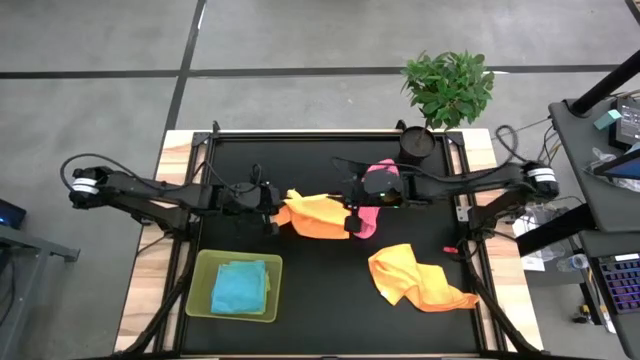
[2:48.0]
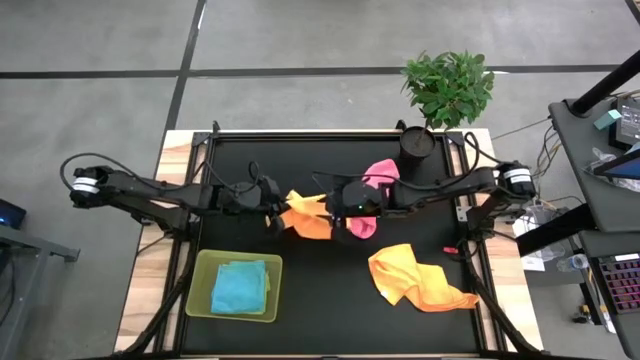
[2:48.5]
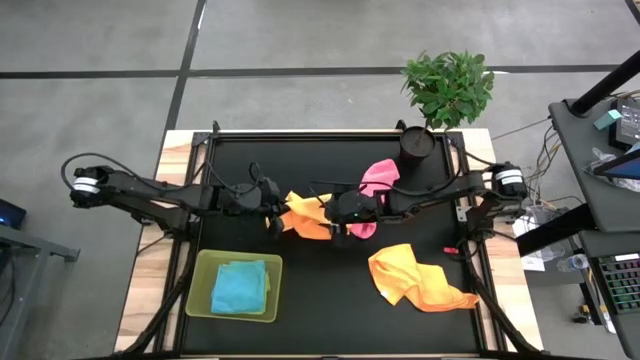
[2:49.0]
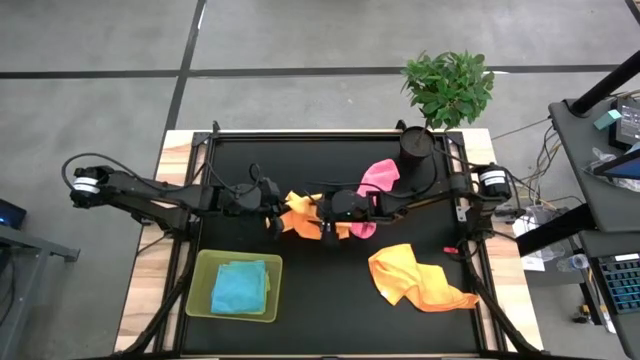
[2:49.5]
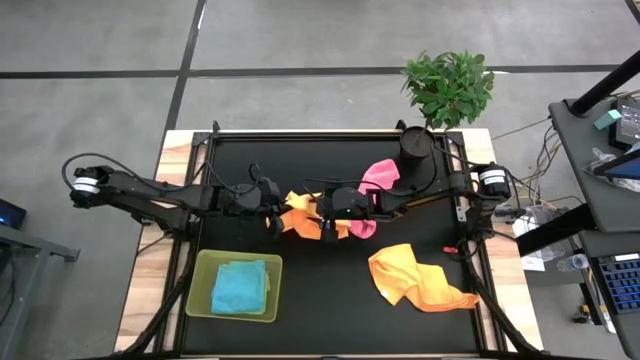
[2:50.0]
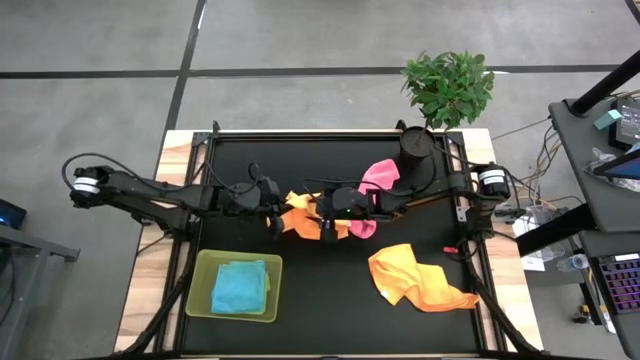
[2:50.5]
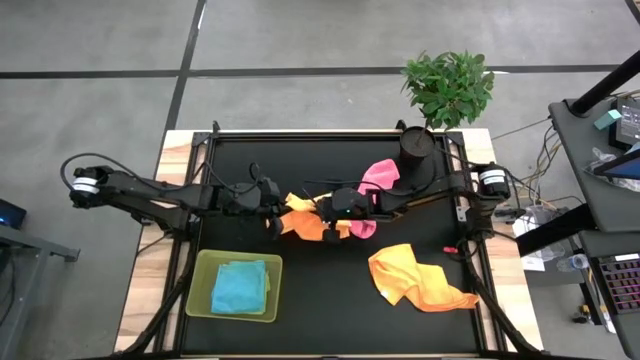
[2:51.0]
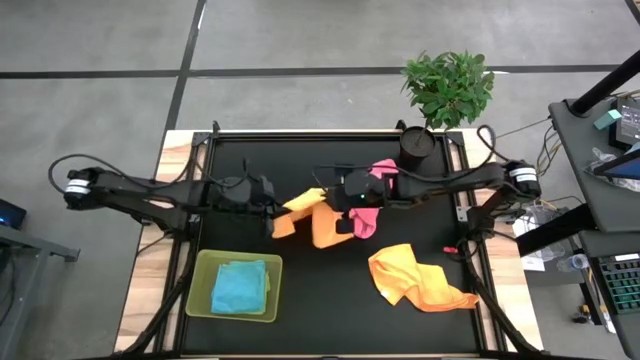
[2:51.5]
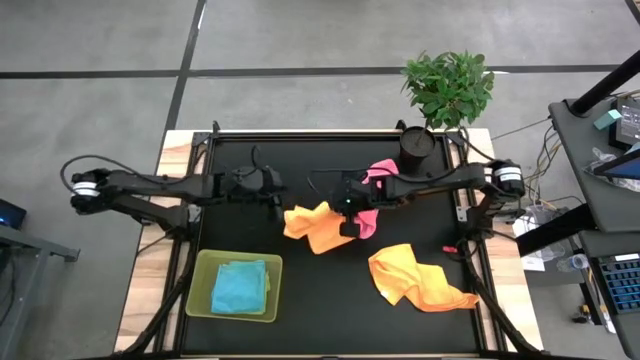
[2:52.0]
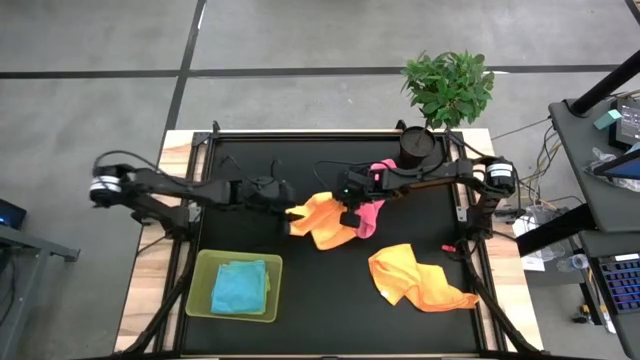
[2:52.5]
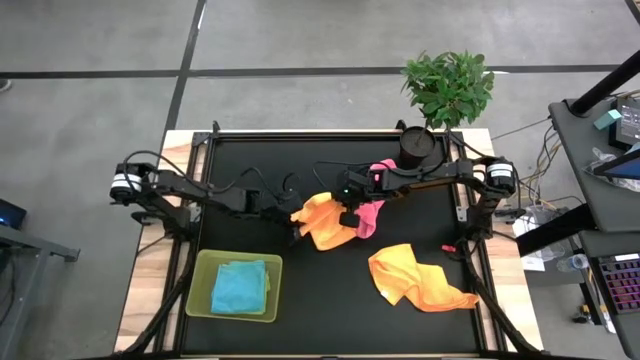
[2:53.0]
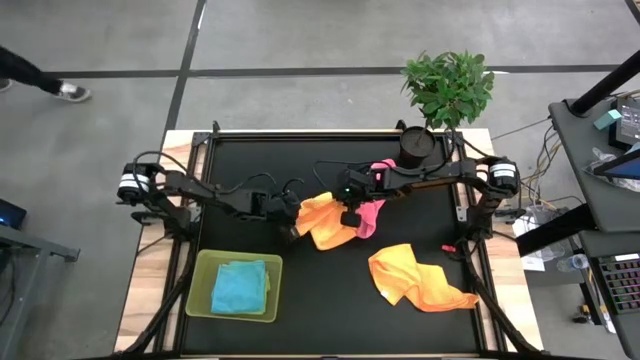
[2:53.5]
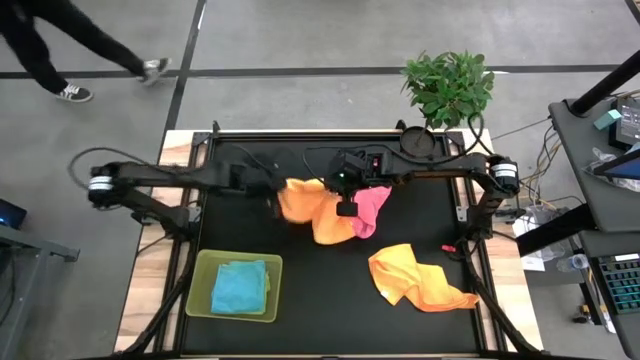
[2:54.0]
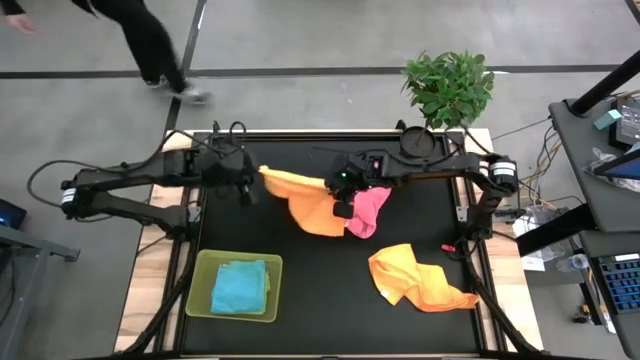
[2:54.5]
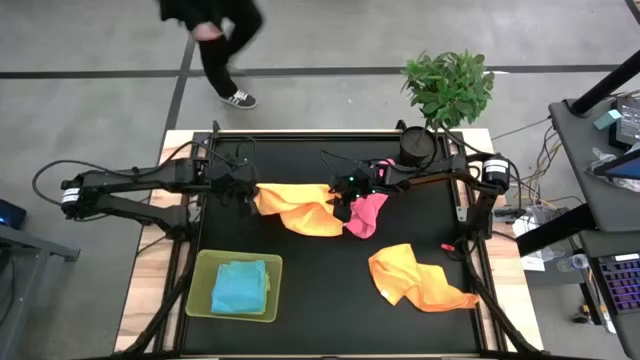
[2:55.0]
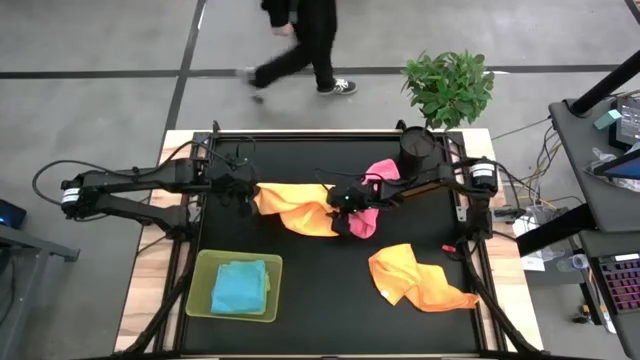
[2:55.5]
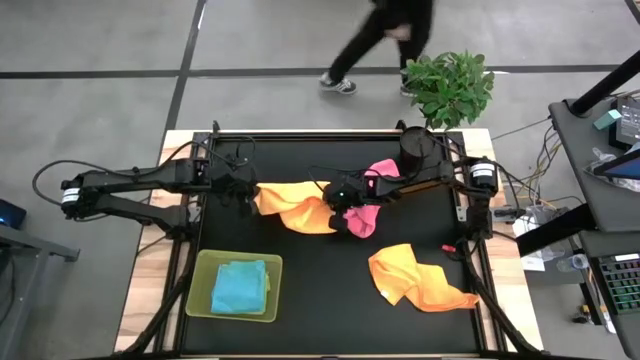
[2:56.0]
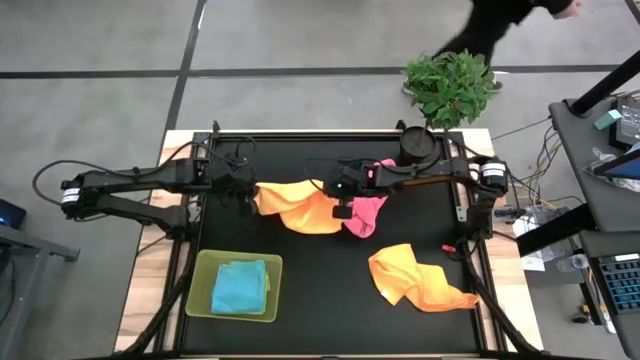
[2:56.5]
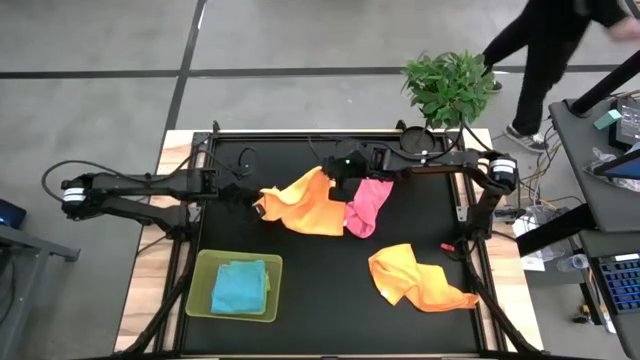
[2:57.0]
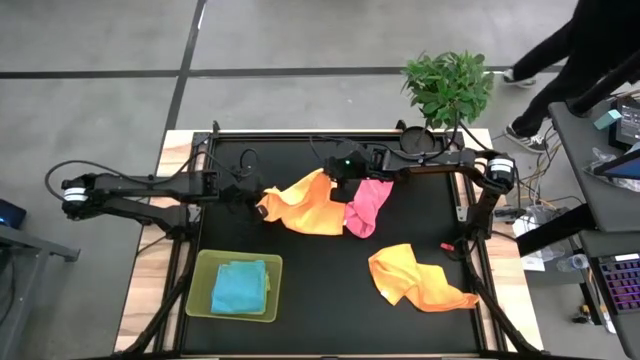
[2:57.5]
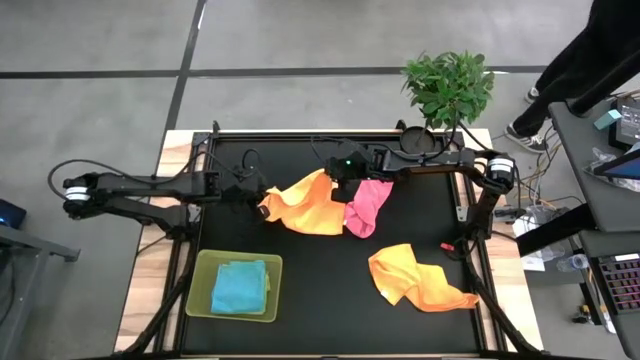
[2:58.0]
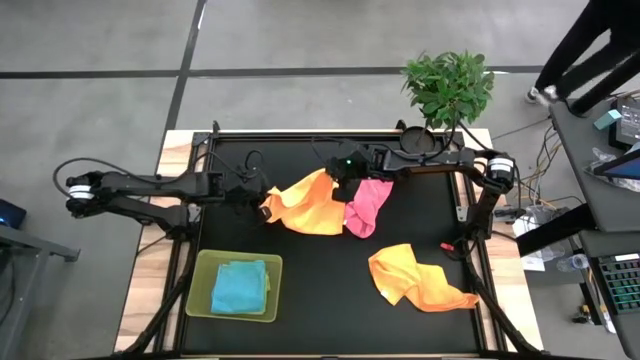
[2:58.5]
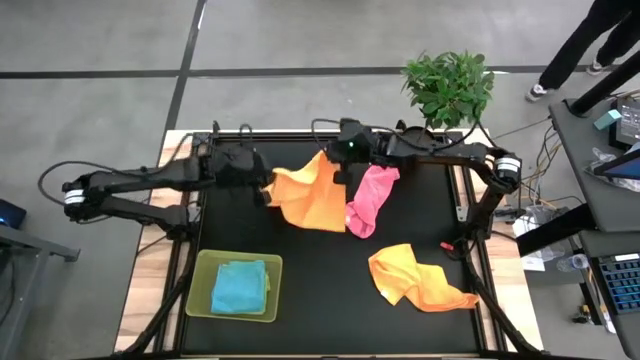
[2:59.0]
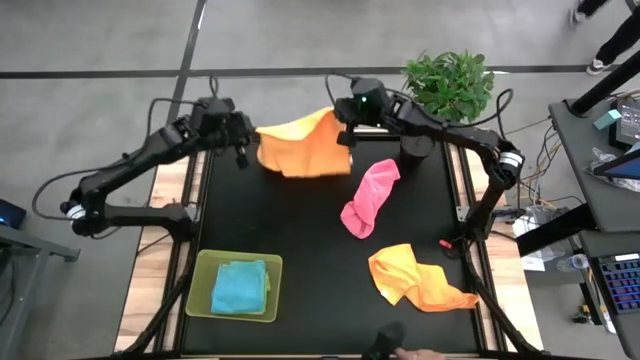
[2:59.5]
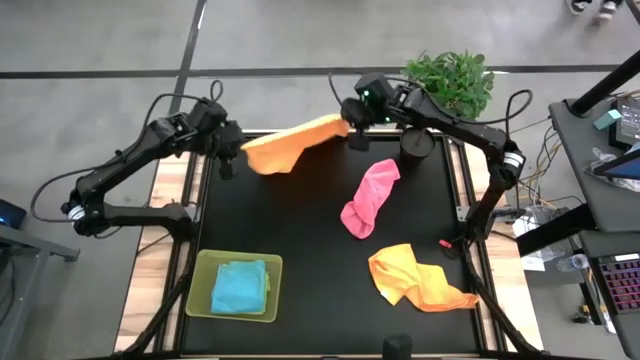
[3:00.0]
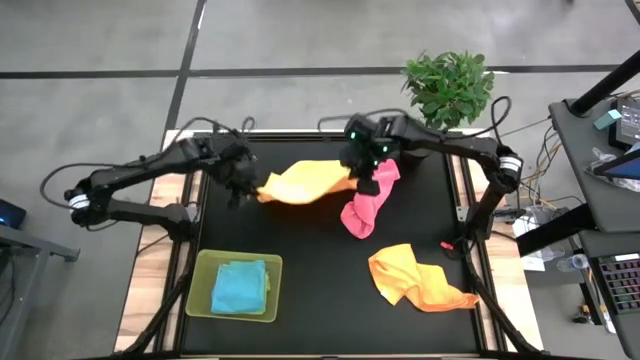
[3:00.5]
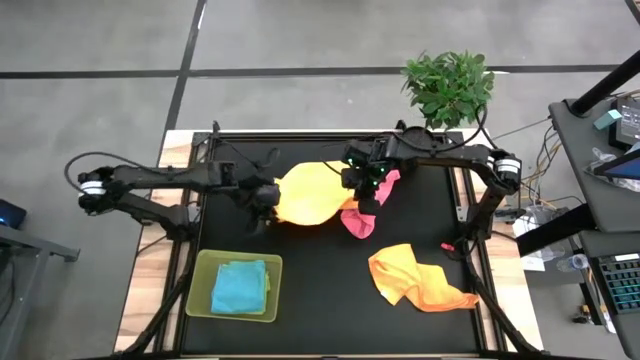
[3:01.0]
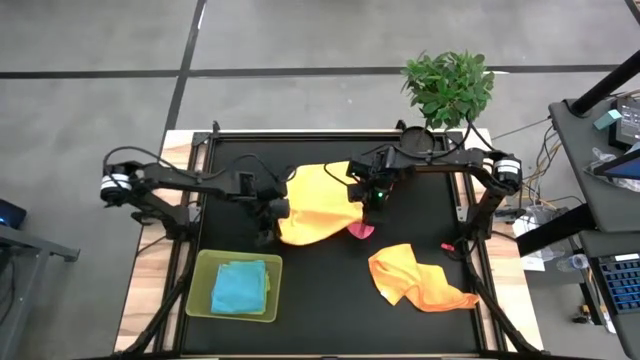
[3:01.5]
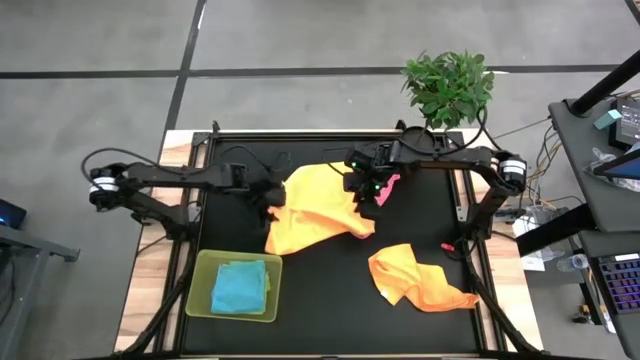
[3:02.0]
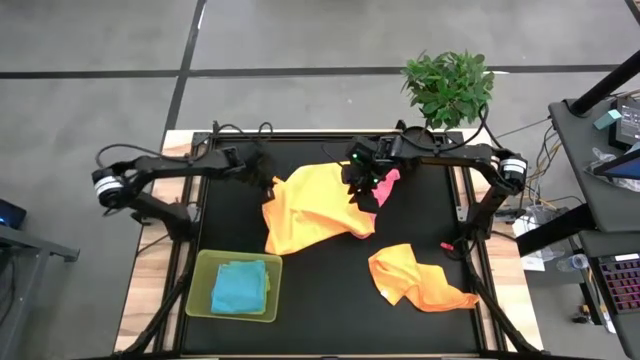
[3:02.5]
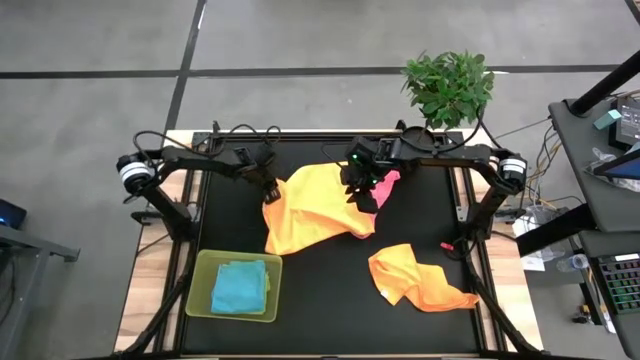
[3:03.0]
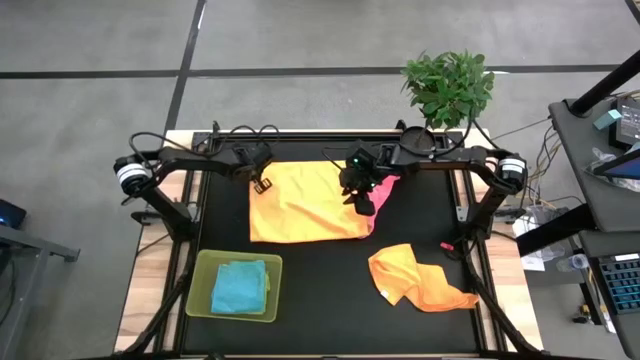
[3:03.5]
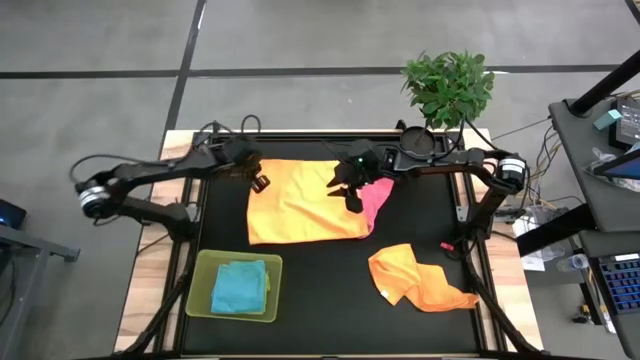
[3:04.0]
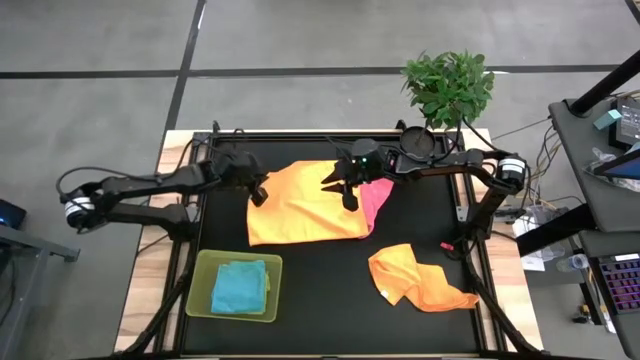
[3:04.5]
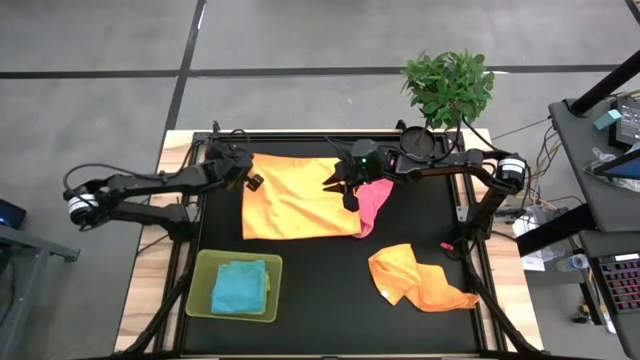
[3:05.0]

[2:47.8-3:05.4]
Task: Fold microfiber towels
Fold the left orange microfiber towel

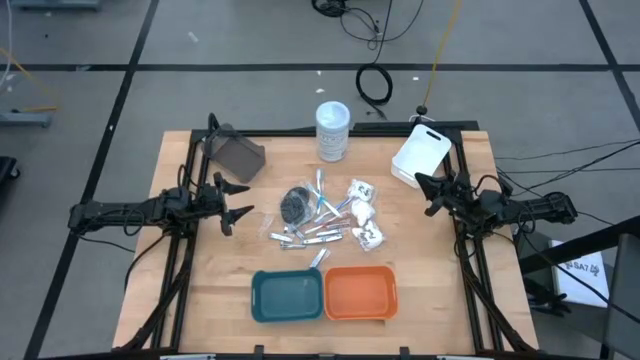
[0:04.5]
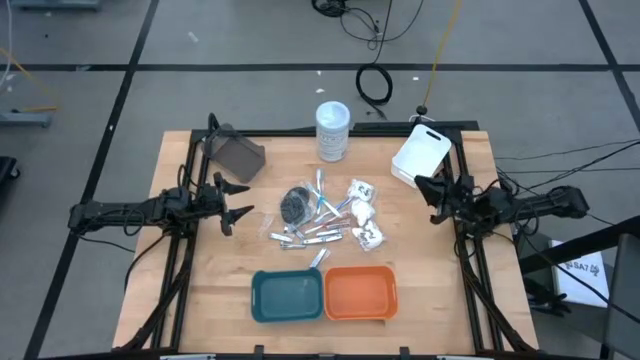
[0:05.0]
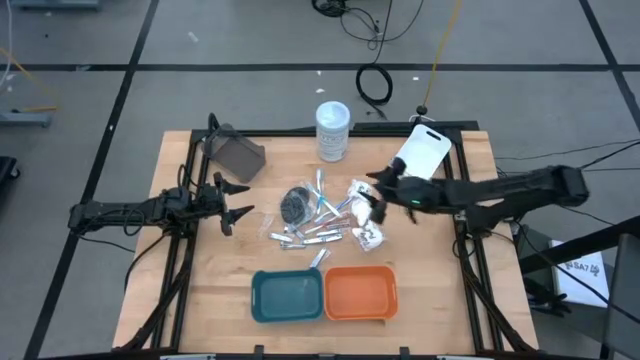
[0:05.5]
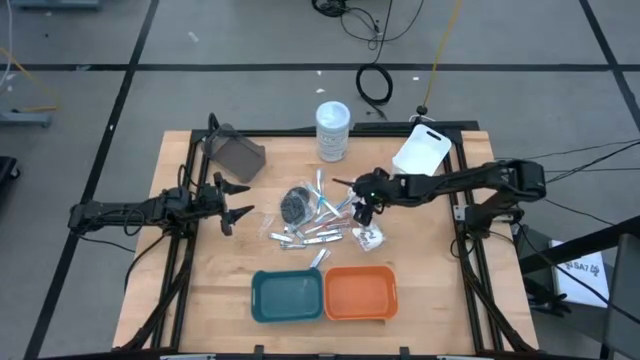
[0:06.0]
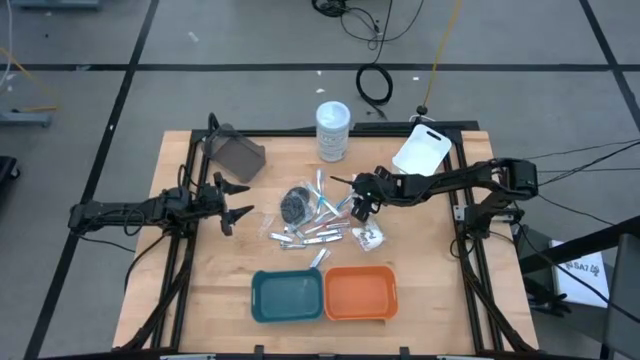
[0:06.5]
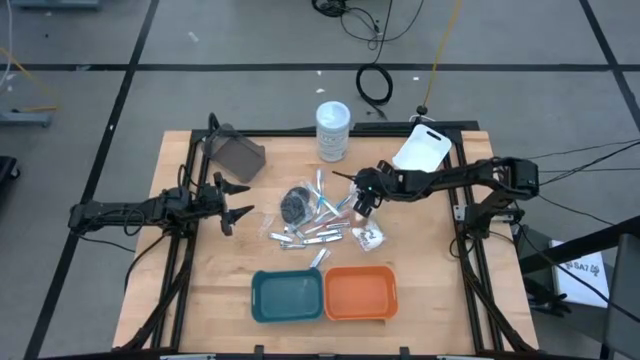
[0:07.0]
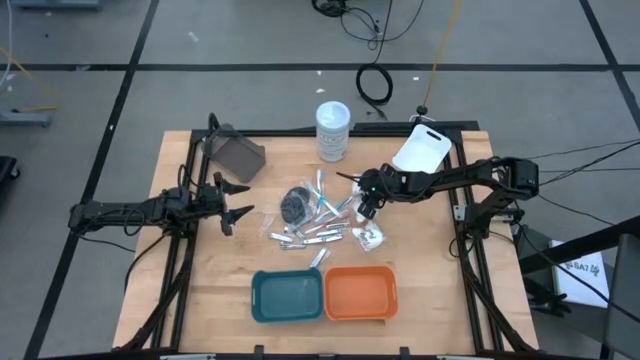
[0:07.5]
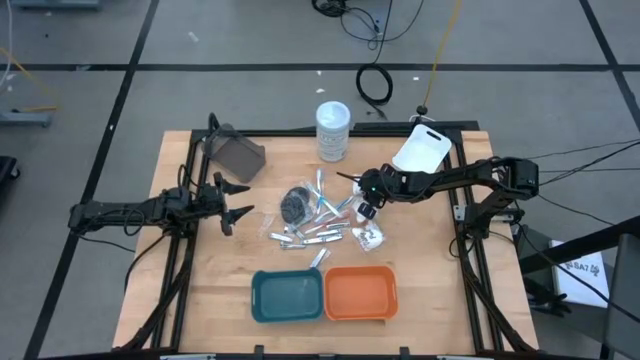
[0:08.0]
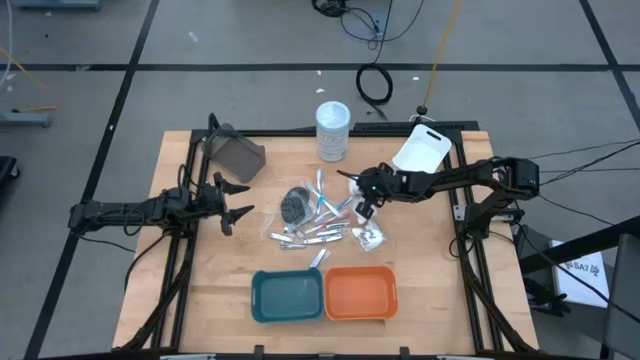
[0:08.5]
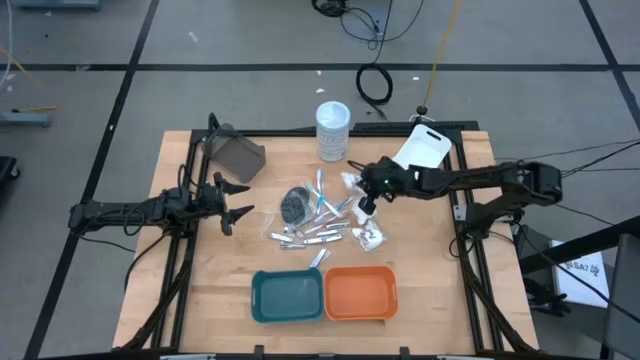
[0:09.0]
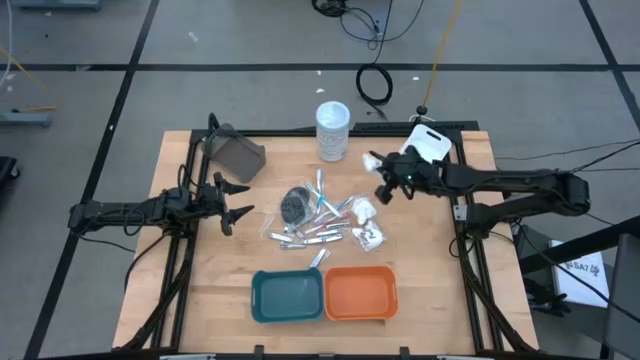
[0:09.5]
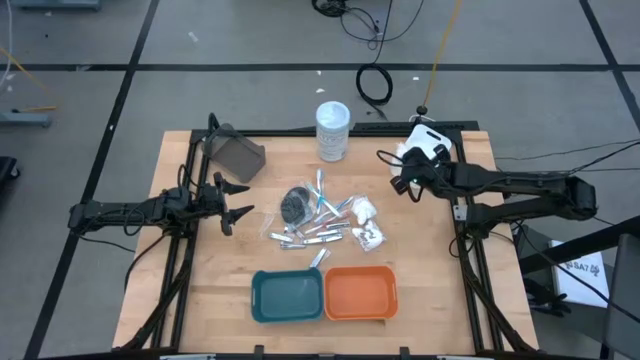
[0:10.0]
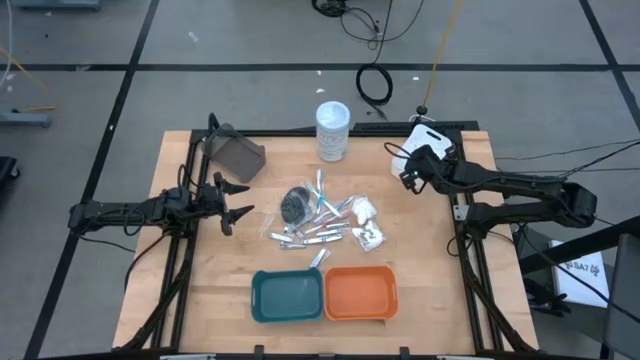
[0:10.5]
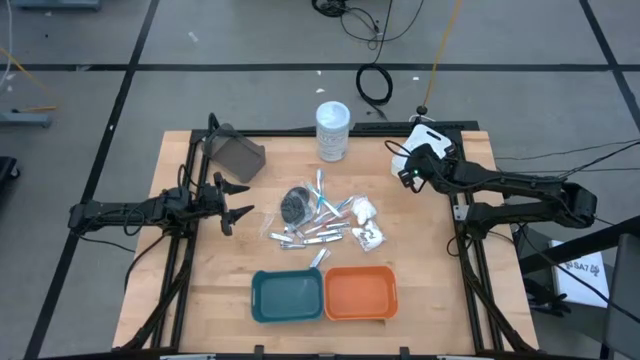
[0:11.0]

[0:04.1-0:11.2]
Task: Pick & Place Travel size toiletries
Put the white cotton pack into the white bin
